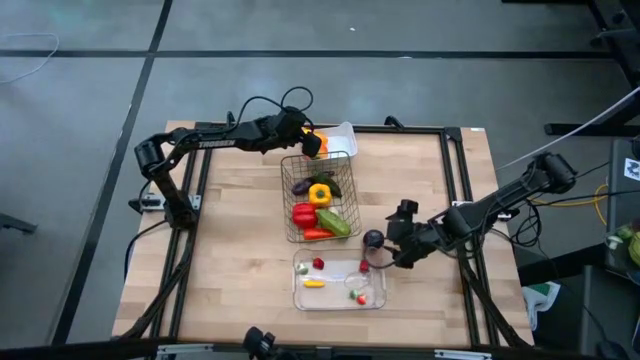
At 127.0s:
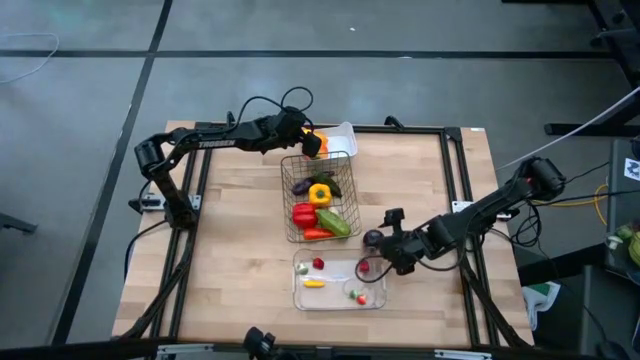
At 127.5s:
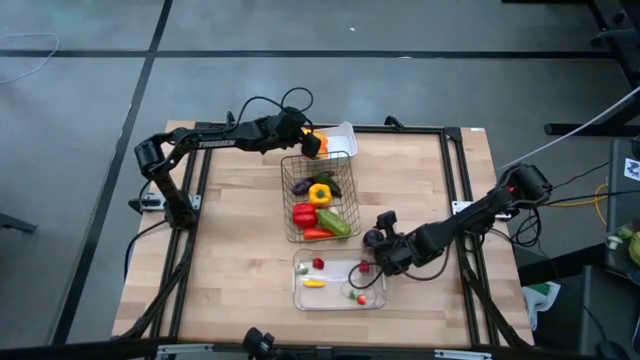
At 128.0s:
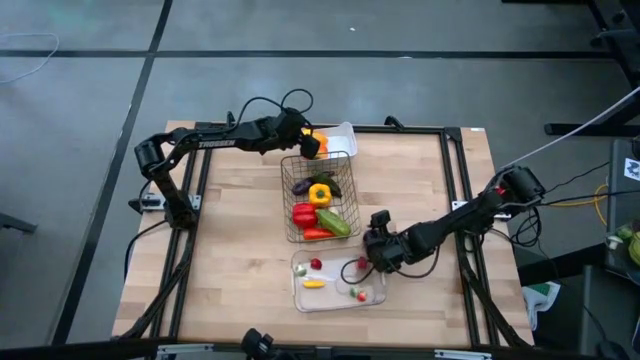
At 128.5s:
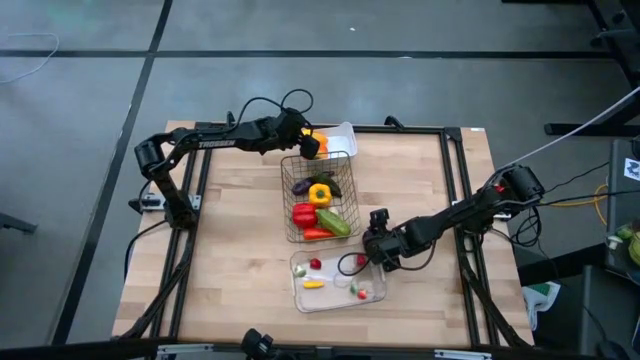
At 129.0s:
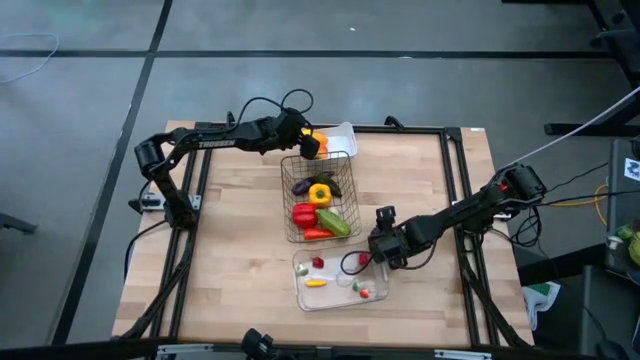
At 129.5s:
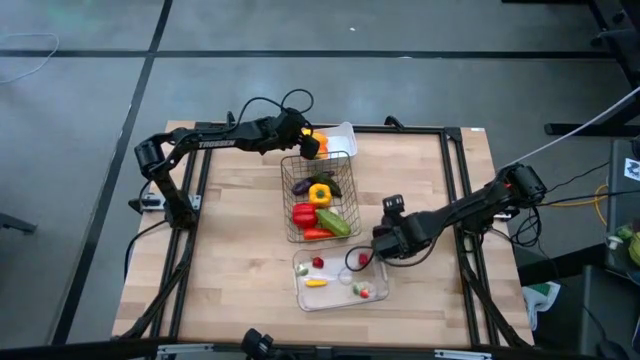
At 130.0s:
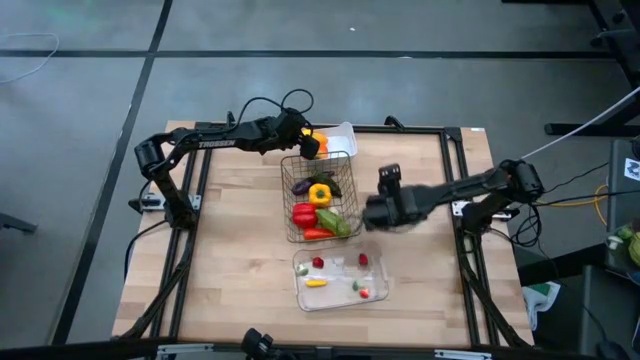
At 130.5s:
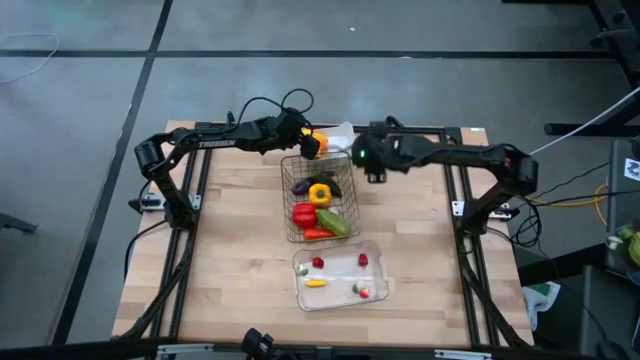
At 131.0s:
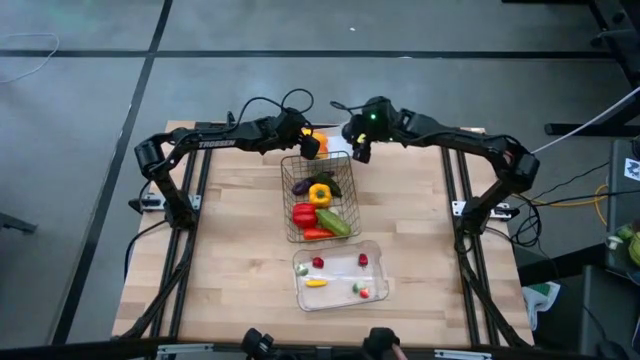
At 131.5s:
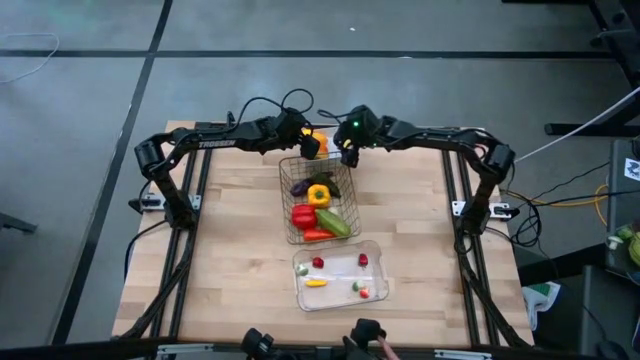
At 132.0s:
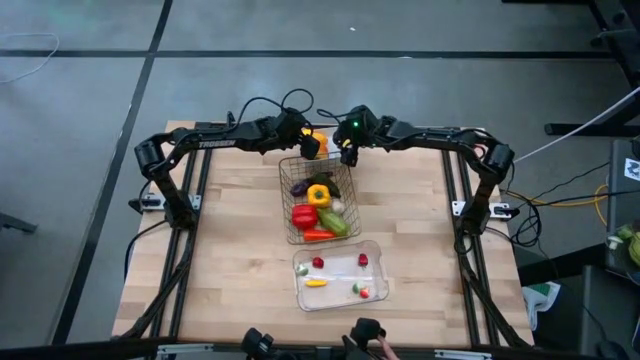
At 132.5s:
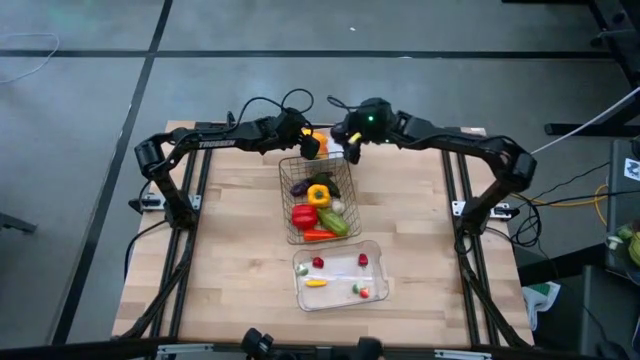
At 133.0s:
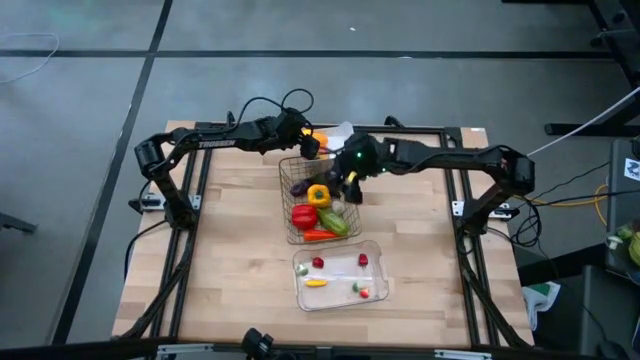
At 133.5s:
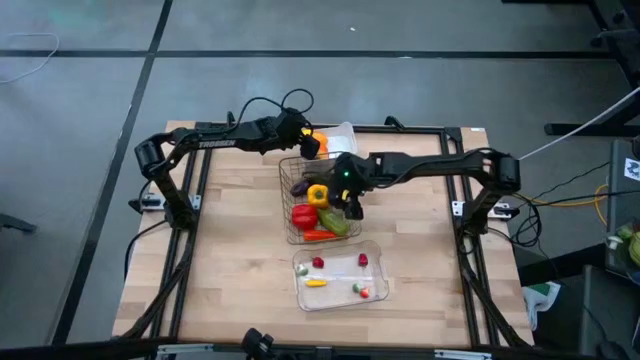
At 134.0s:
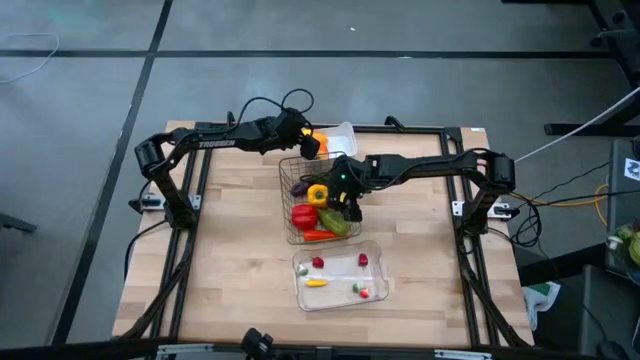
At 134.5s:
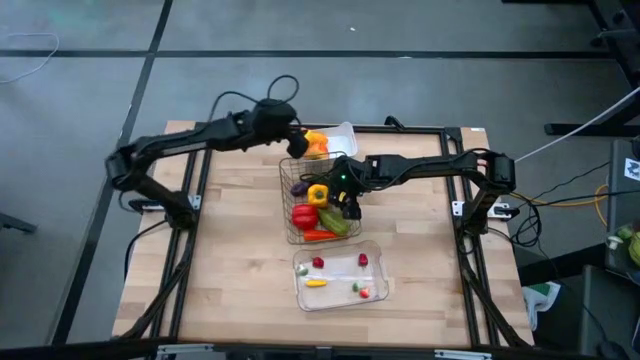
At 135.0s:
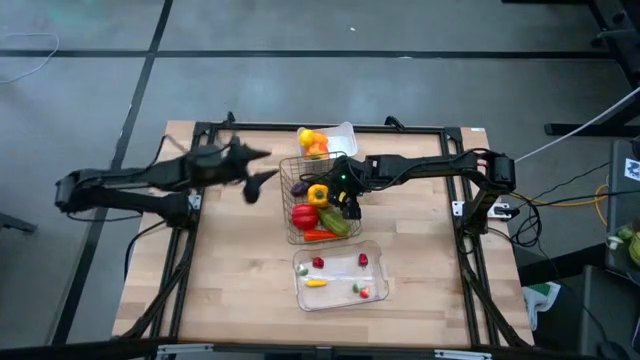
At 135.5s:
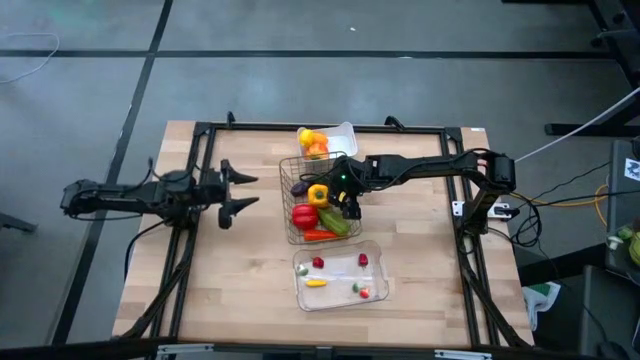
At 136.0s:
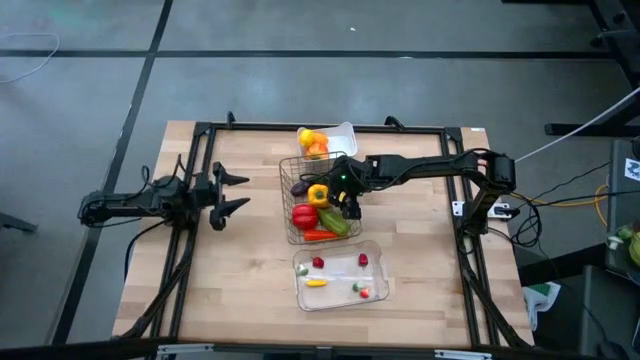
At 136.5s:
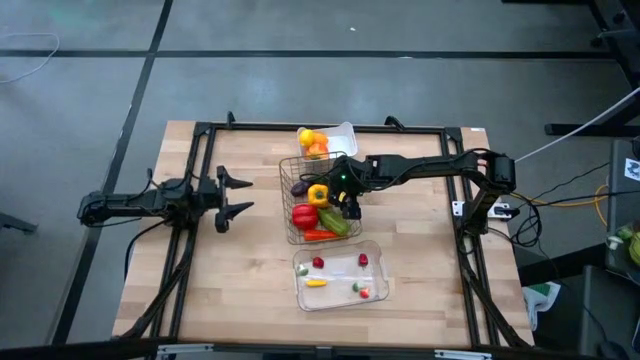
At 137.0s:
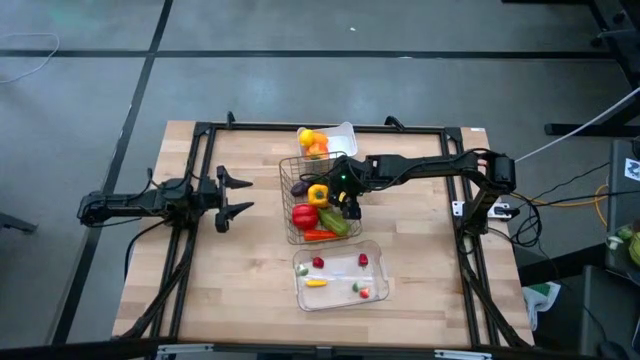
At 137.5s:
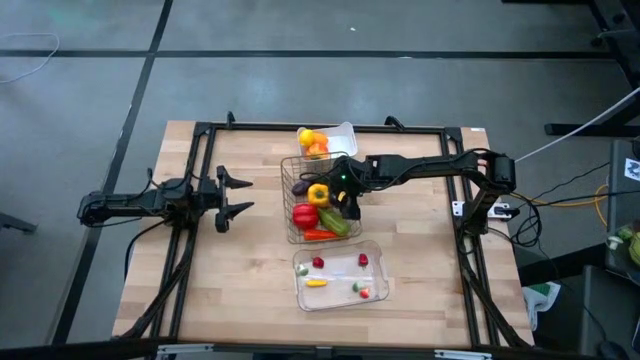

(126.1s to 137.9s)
Task: Sort produce into baskets
Put the plum into the wire basket

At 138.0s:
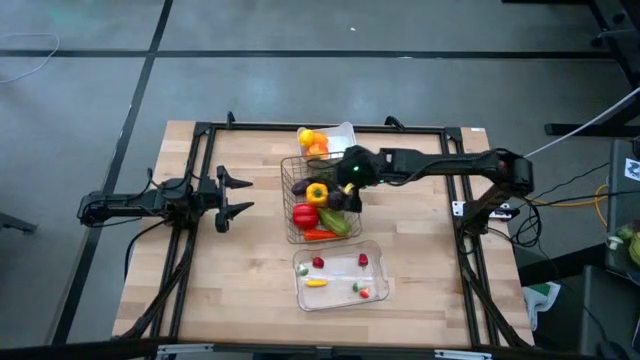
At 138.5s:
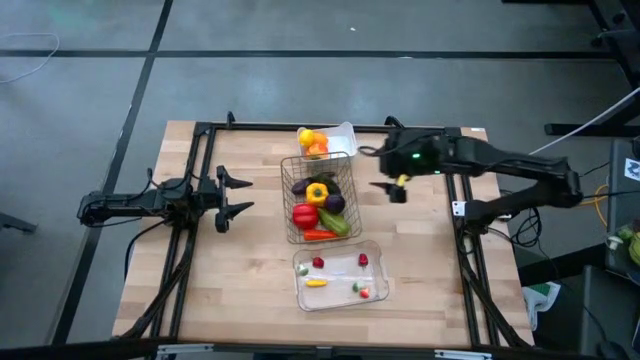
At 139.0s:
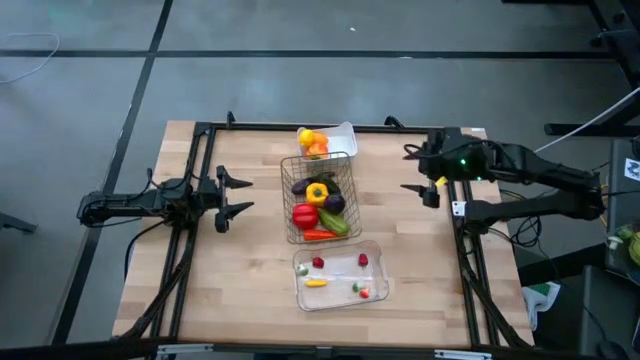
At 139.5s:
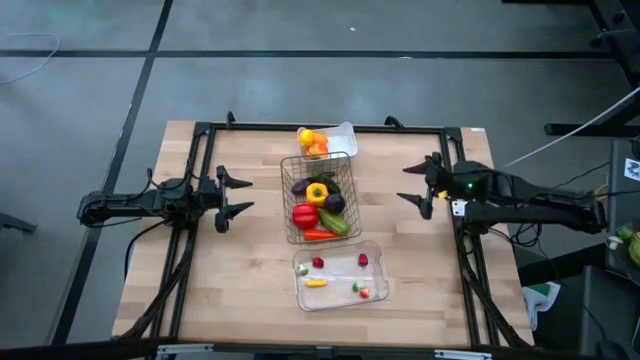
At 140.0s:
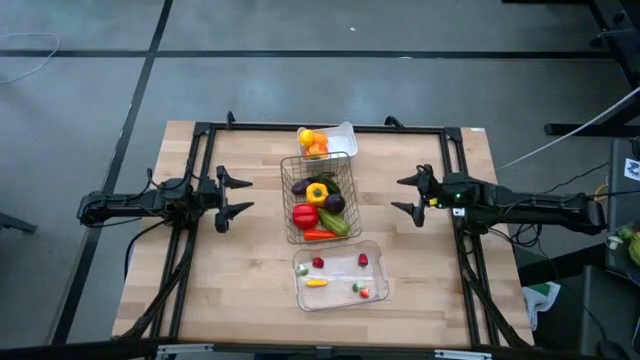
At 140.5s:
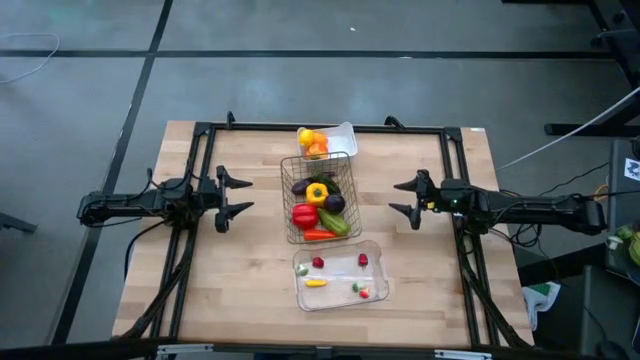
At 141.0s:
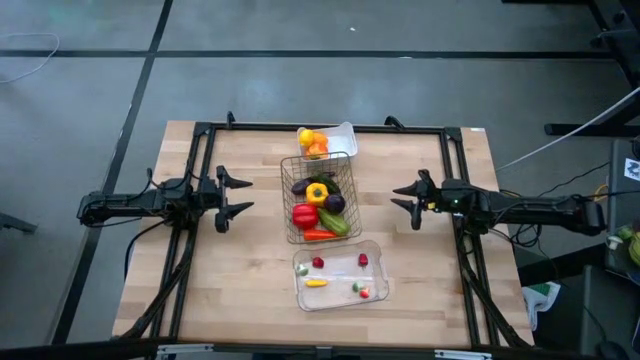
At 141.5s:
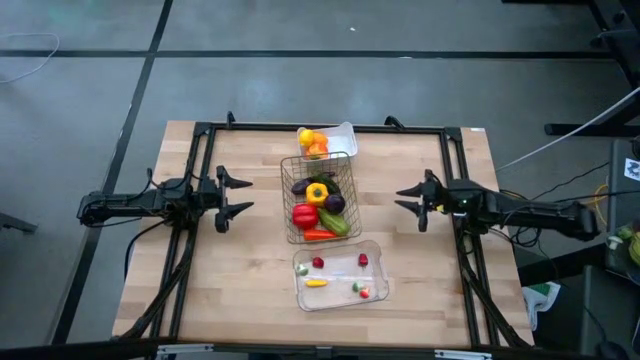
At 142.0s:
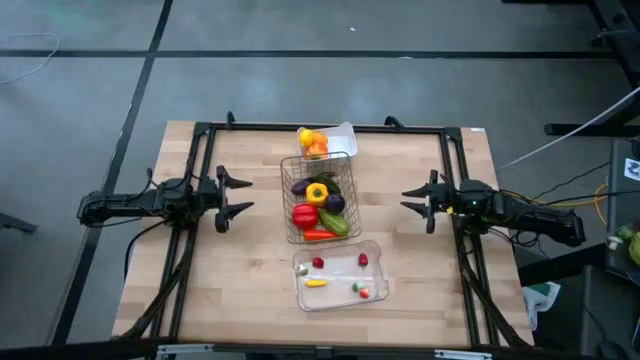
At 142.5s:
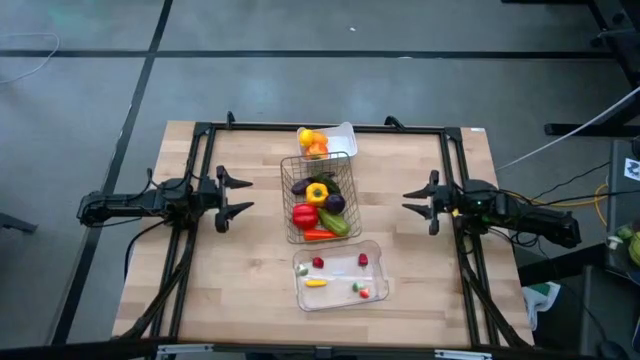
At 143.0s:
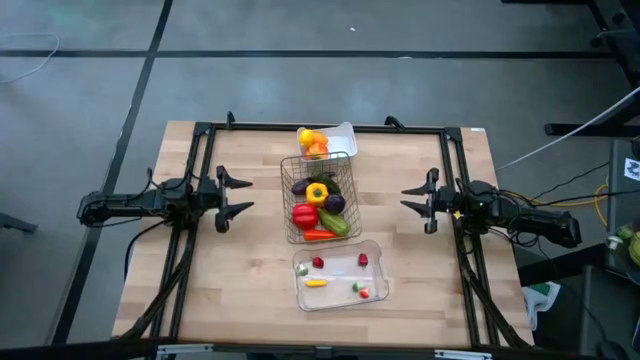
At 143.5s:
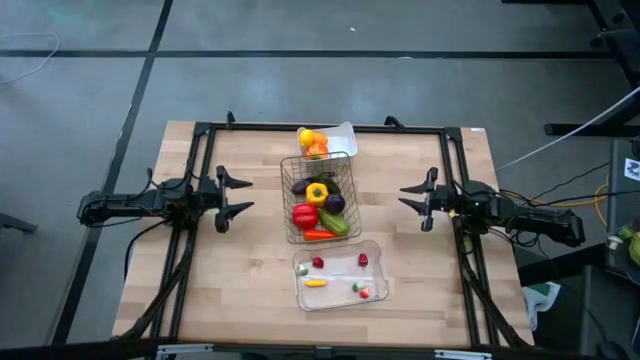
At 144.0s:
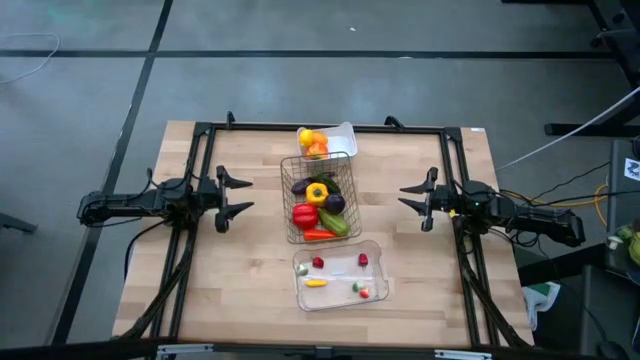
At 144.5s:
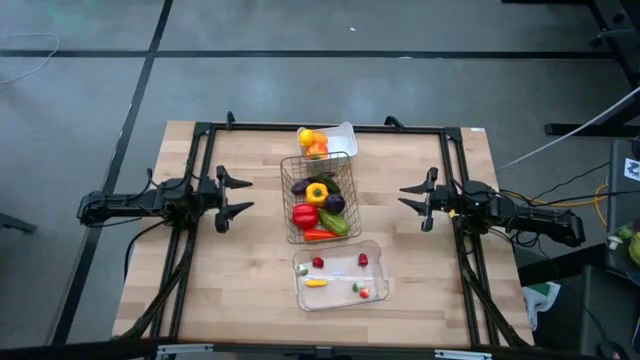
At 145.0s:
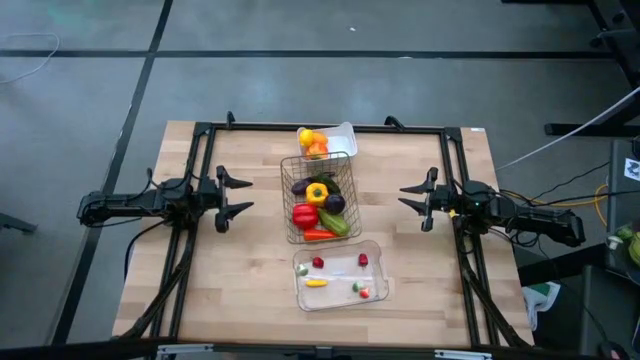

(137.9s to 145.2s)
Return to Home Position

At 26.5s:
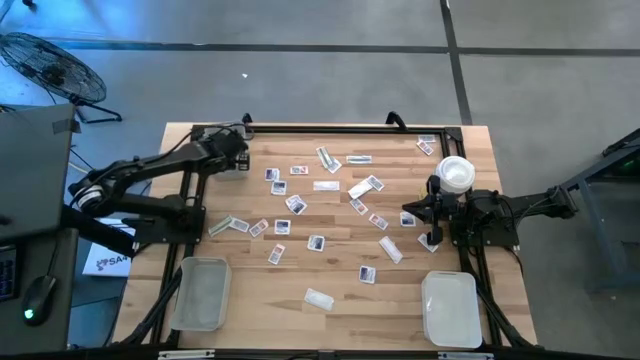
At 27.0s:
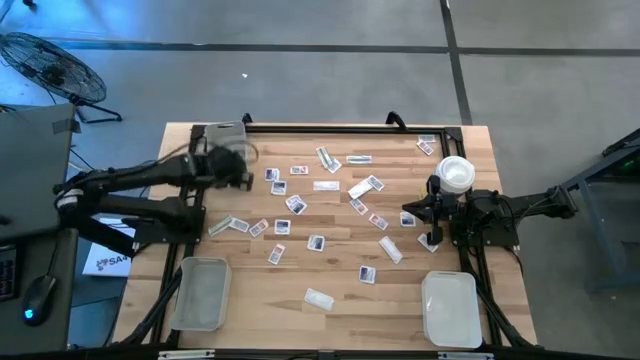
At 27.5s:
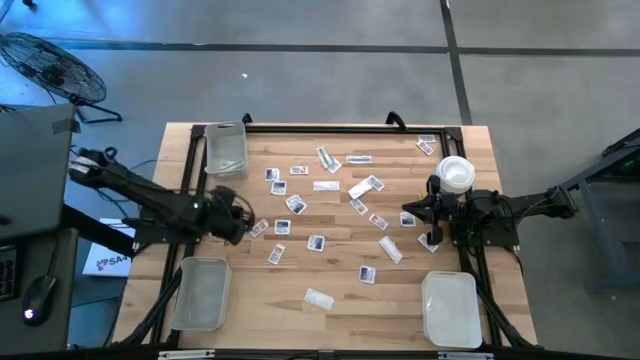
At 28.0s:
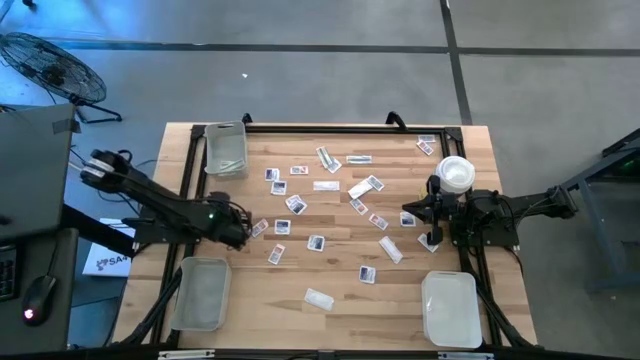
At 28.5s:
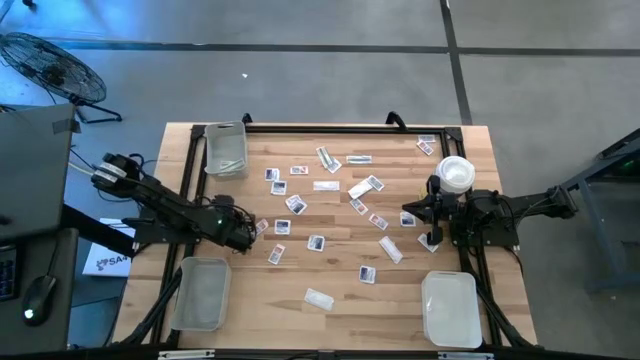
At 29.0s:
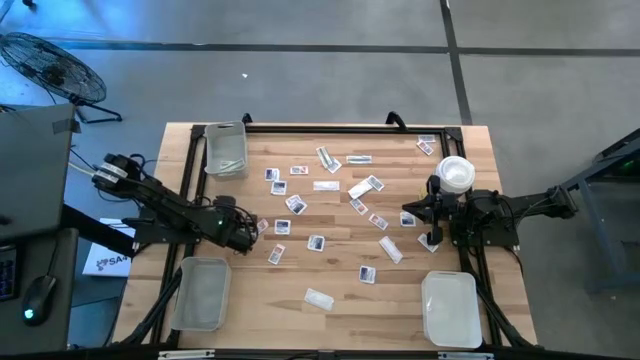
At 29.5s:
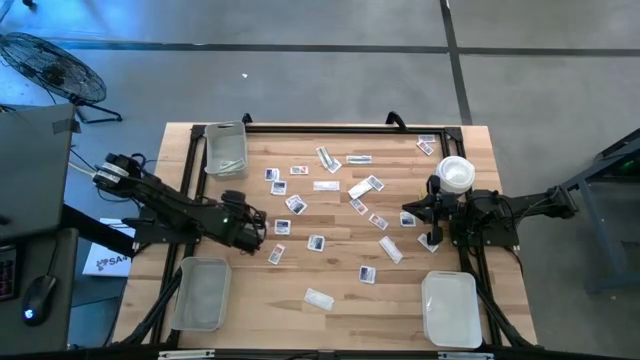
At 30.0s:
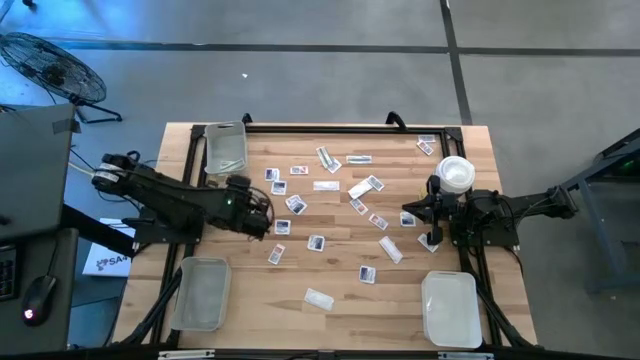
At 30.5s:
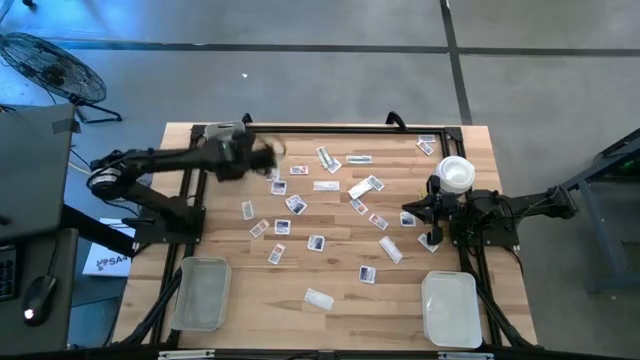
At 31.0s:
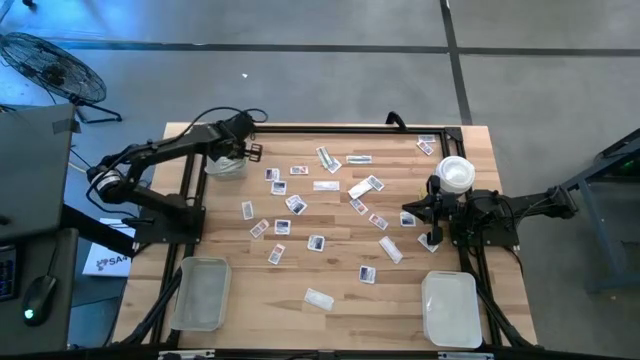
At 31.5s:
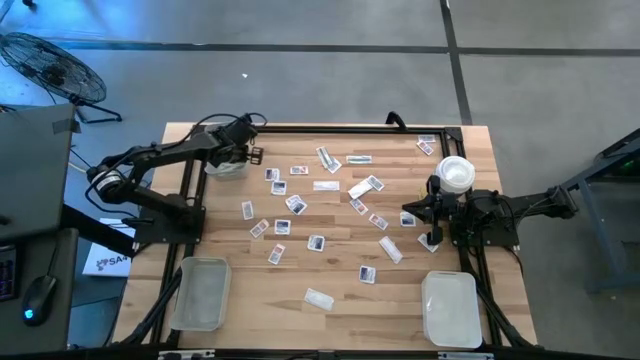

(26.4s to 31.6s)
Task: Pick & Place First Aid Supplies
Put the green bandage pack into the top gray bin
